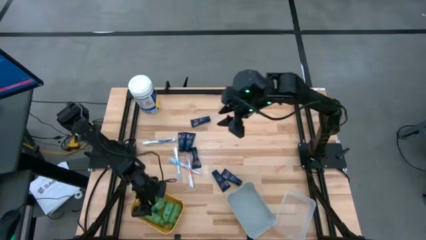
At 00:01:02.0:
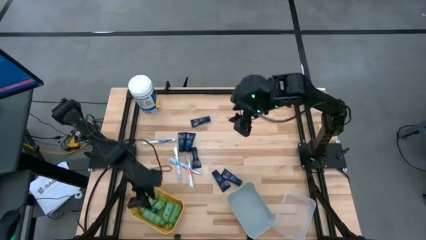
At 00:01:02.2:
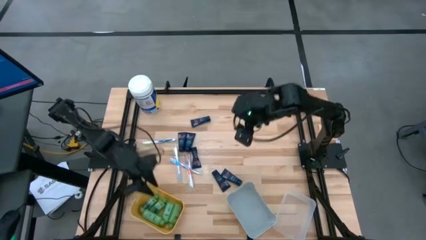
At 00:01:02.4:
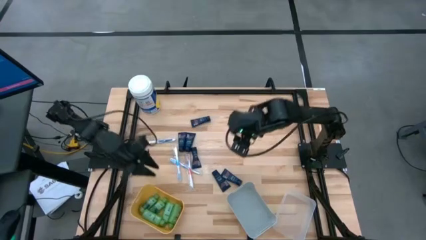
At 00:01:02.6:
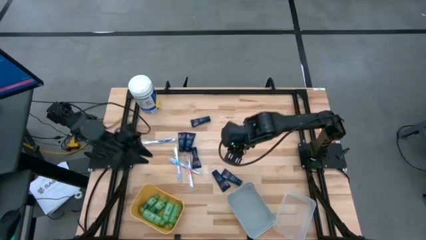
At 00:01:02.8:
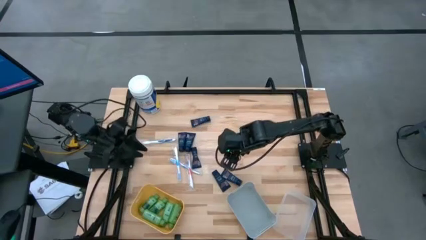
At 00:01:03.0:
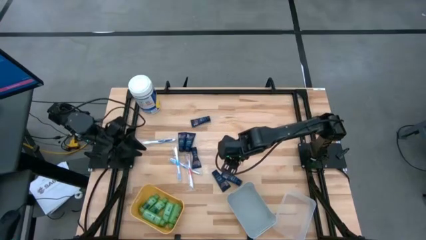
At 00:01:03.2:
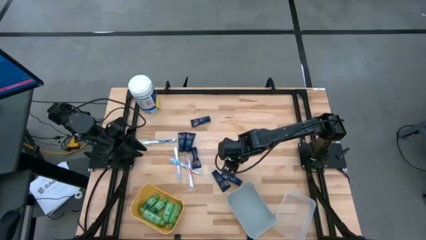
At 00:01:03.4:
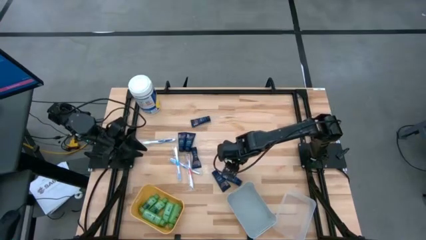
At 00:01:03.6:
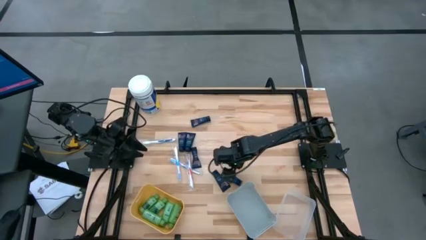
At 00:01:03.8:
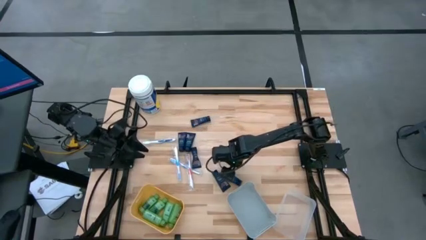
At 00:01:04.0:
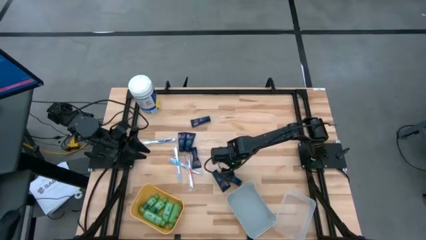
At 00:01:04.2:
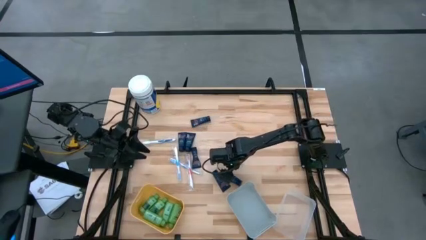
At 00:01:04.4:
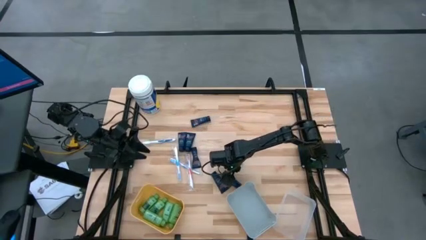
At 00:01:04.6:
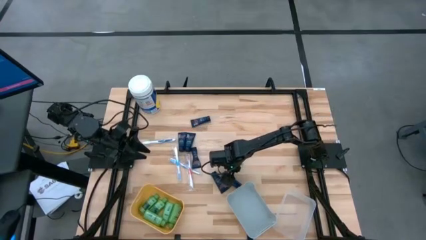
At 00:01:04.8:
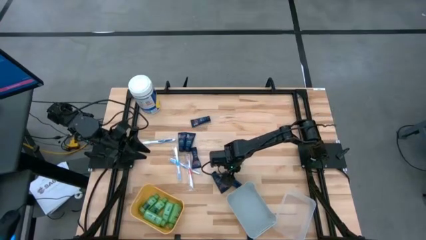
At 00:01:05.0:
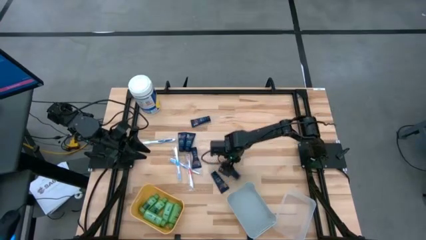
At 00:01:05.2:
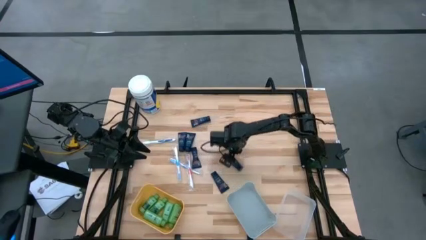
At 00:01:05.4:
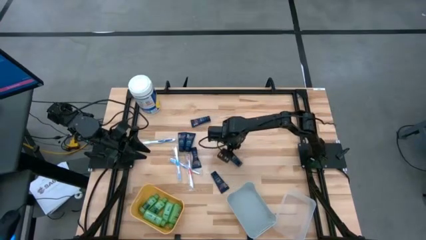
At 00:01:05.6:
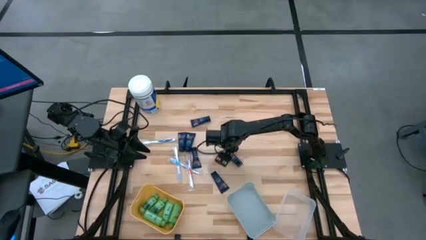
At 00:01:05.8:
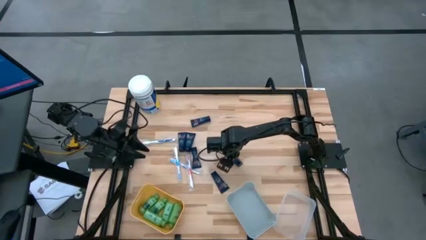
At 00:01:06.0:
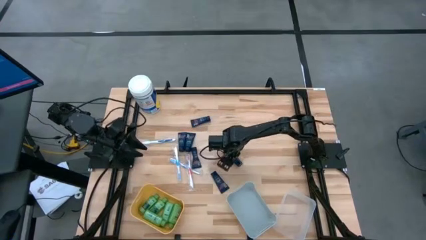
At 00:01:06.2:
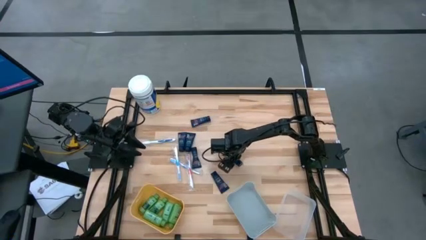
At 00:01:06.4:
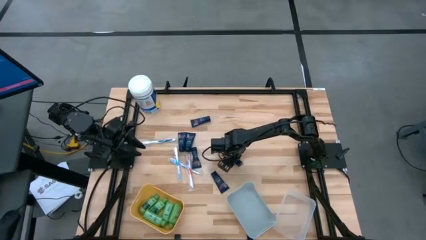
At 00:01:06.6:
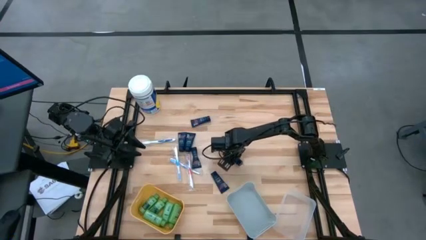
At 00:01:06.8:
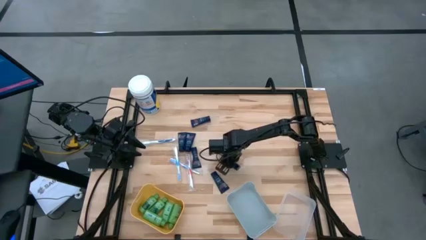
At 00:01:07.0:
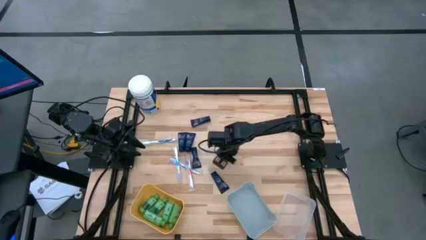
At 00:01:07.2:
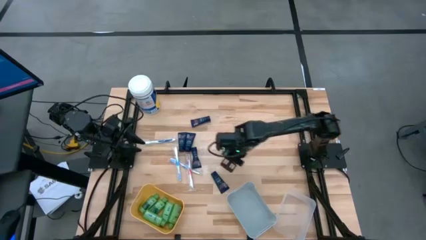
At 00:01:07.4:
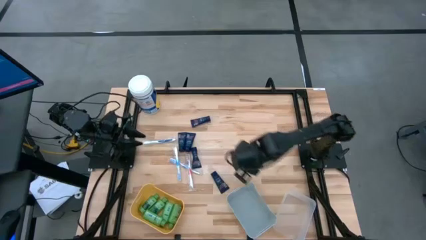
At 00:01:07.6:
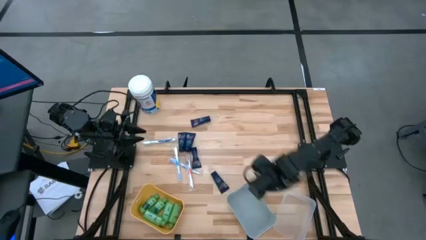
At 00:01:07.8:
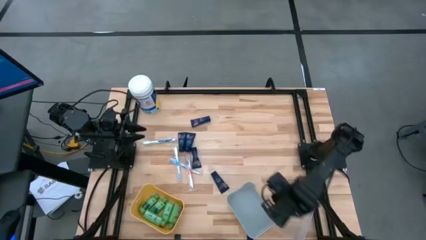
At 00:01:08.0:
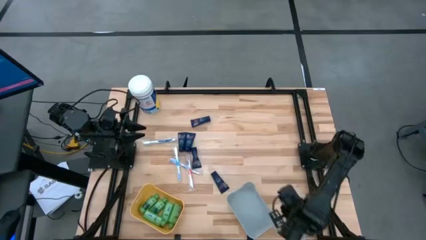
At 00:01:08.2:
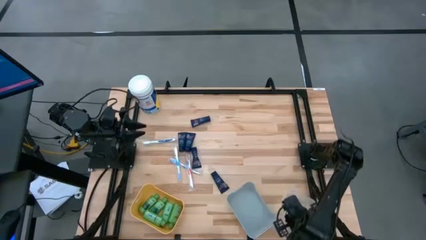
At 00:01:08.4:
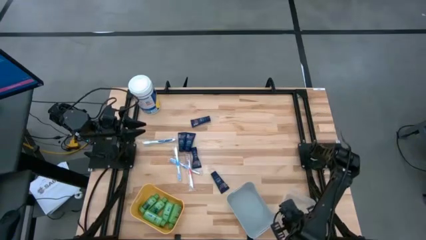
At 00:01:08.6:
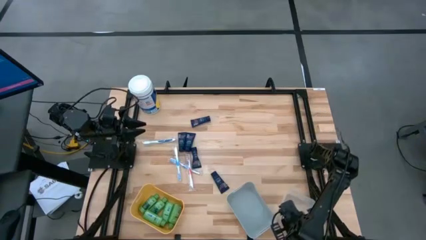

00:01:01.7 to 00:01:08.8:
Task: Pick & Place Travel size toiletries
Put the blue shave cream into the transparent bin

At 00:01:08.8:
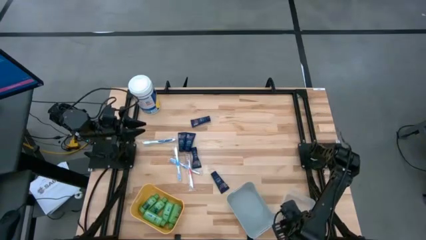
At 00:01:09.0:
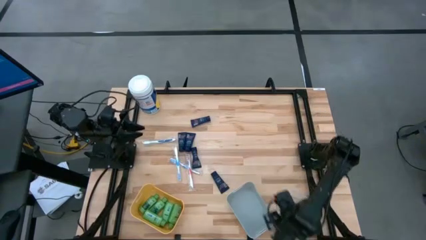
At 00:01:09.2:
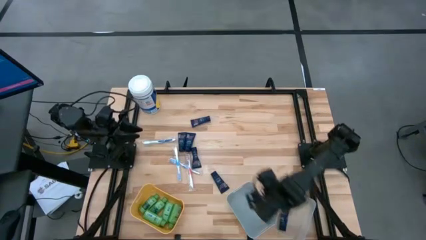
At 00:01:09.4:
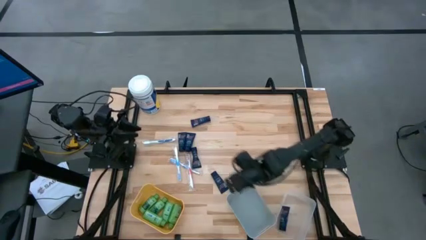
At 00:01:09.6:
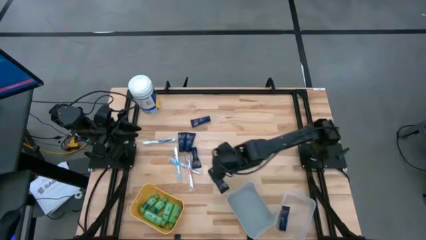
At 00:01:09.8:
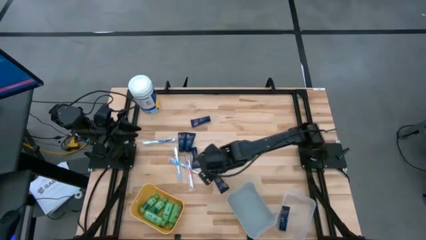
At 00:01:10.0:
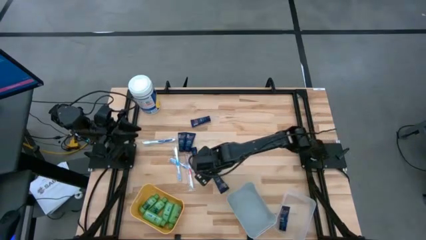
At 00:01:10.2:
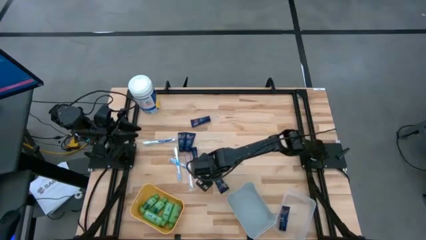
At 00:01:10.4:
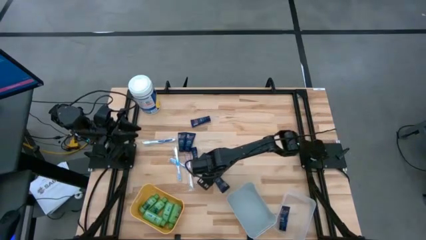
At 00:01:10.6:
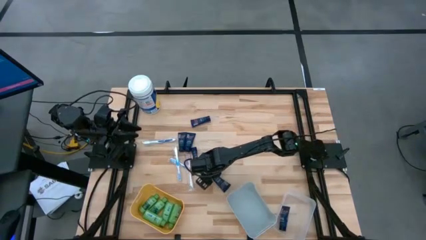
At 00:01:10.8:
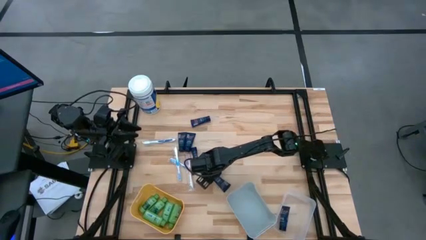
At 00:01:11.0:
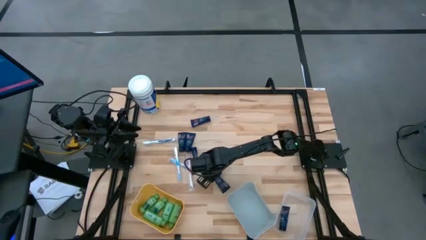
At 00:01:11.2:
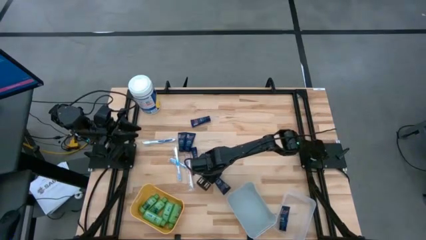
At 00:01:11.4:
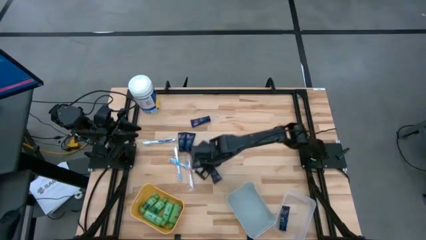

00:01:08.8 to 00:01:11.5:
Put the blue shave cream into the transparent bin

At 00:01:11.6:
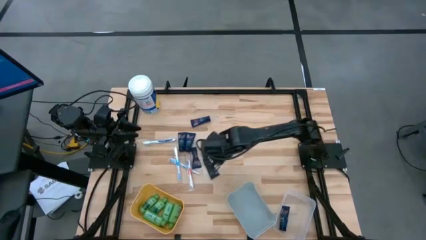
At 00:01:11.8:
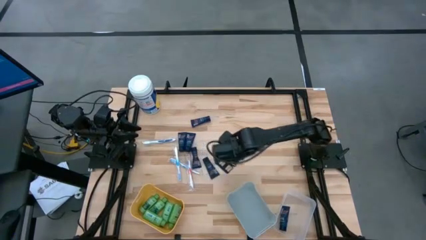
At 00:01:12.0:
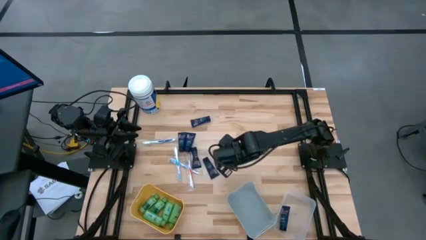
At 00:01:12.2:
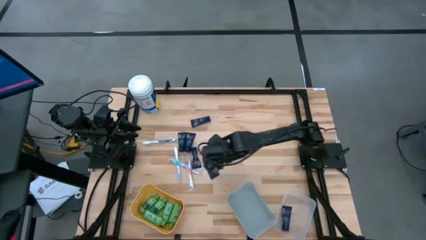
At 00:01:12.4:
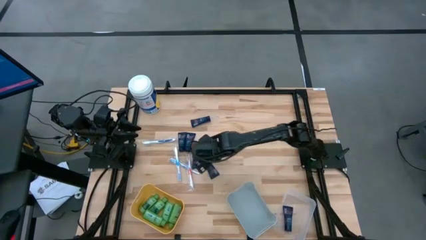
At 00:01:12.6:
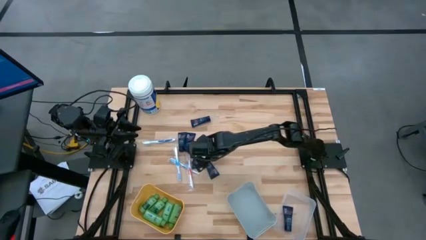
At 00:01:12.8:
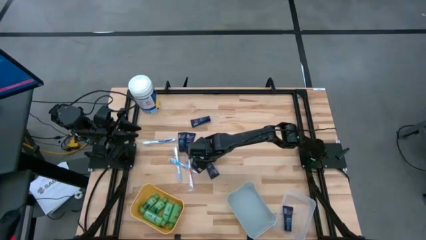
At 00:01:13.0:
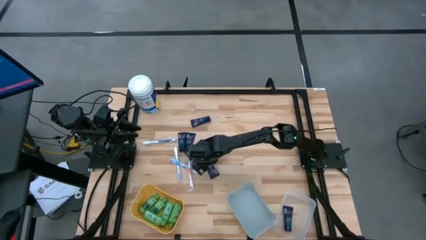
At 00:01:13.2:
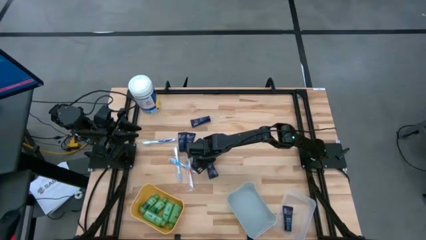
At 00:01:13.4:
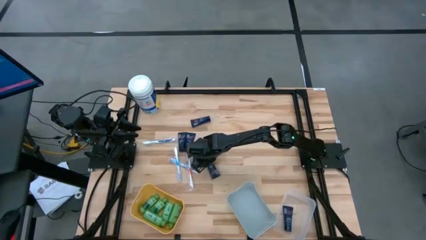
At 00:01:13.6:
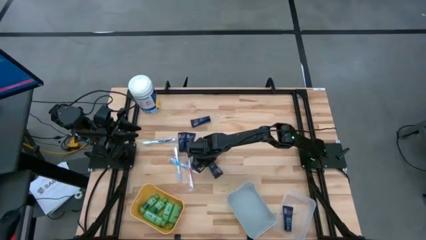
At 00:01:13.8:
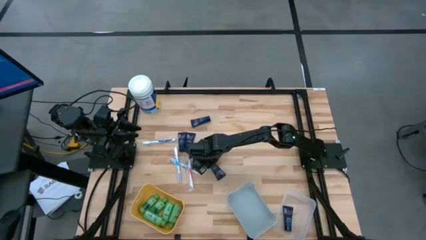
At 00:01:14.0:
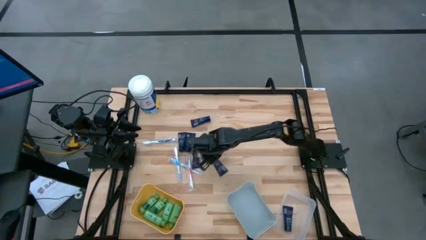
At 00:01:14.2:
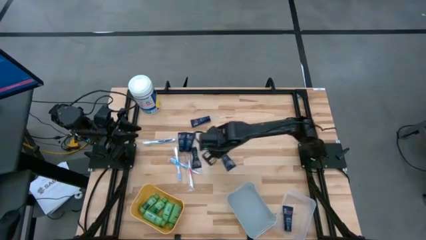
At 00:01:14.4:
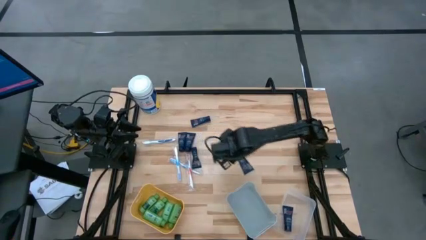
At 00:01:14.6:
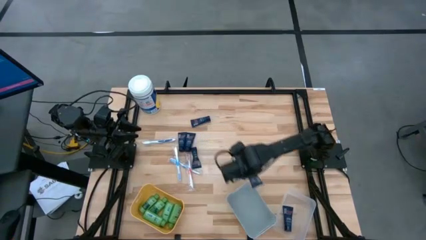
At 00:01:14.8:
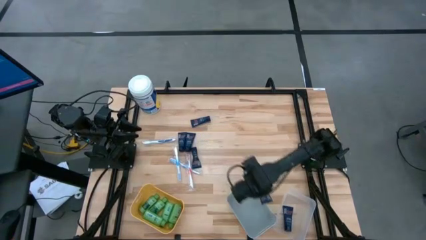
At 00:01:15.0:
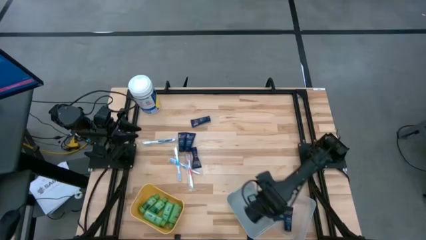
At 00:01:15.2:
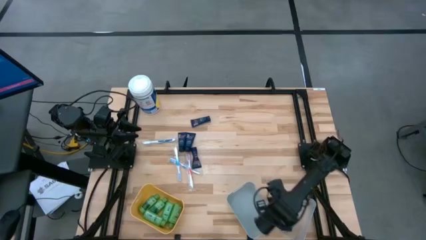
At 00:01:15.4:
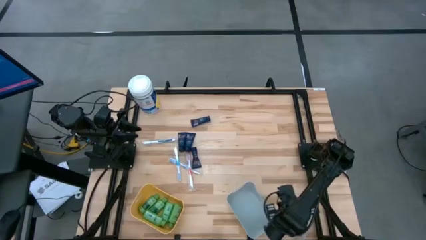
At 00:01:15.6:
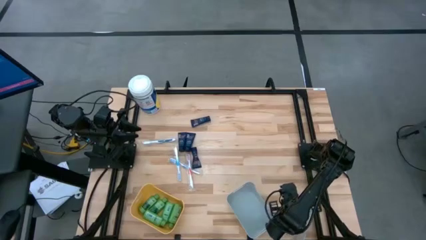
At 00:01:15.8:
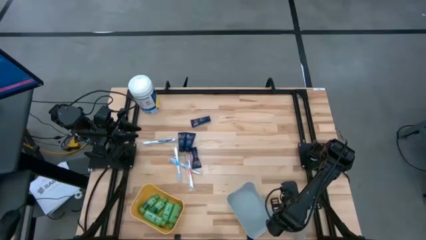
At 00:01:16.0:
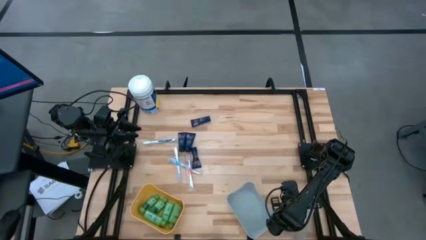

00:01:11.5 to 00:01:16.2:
Put the blue shave cream into the transparent bin

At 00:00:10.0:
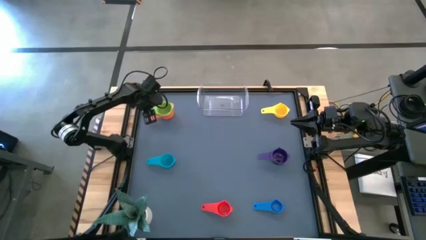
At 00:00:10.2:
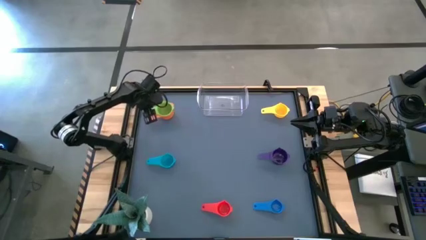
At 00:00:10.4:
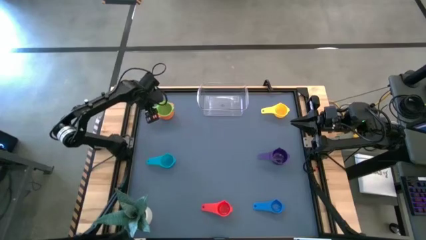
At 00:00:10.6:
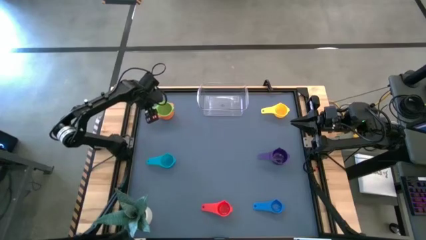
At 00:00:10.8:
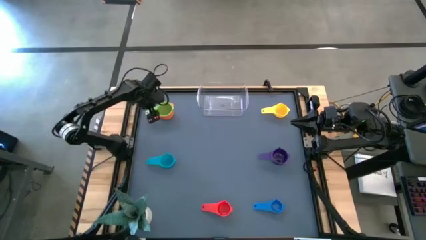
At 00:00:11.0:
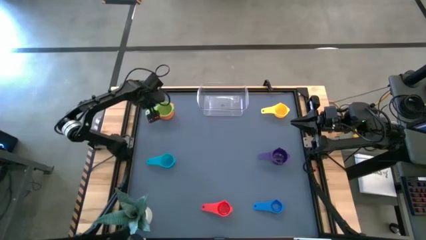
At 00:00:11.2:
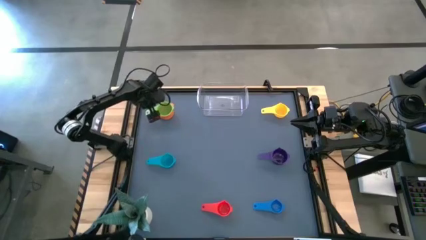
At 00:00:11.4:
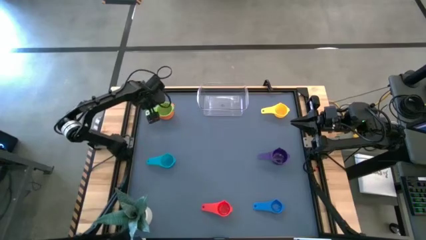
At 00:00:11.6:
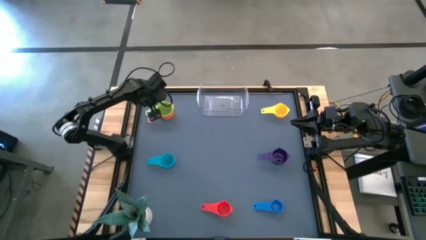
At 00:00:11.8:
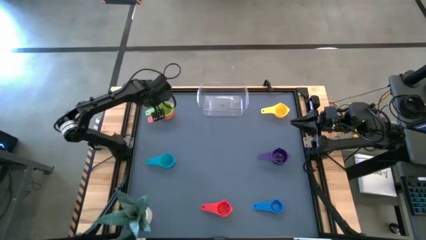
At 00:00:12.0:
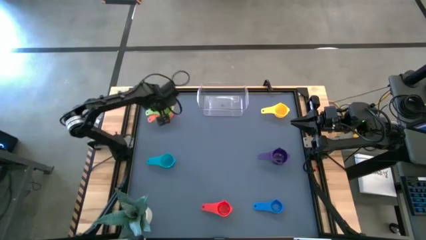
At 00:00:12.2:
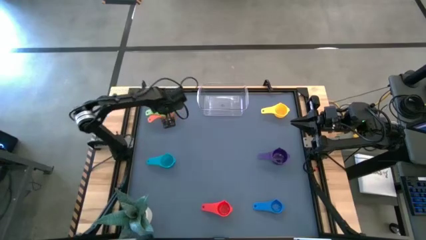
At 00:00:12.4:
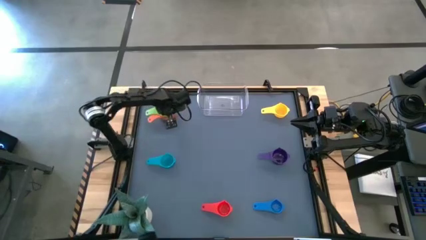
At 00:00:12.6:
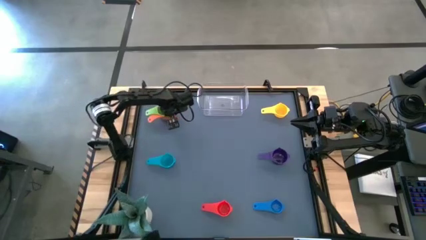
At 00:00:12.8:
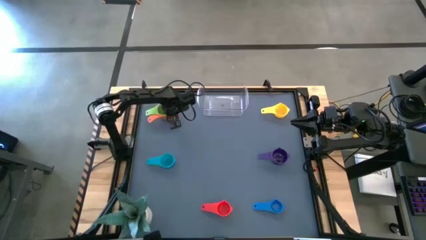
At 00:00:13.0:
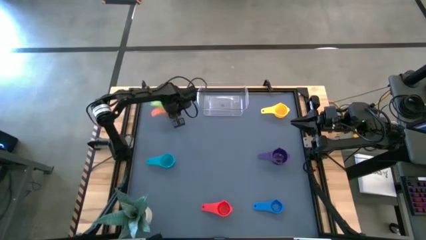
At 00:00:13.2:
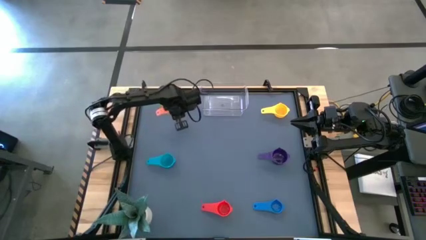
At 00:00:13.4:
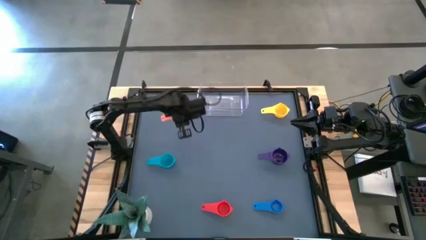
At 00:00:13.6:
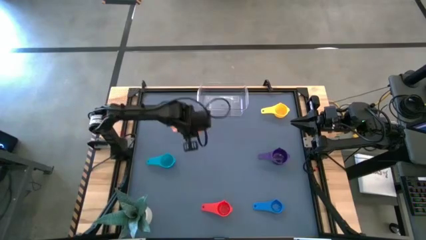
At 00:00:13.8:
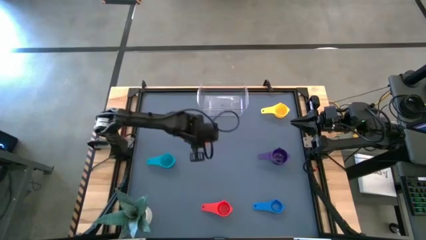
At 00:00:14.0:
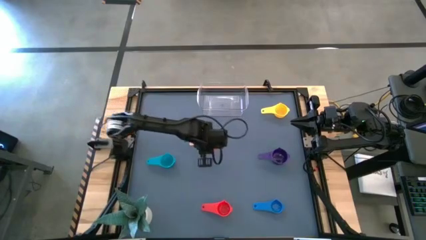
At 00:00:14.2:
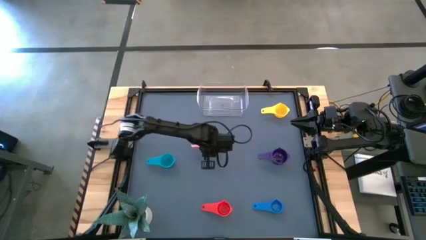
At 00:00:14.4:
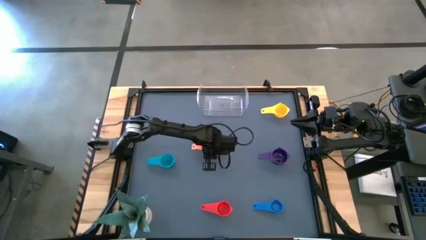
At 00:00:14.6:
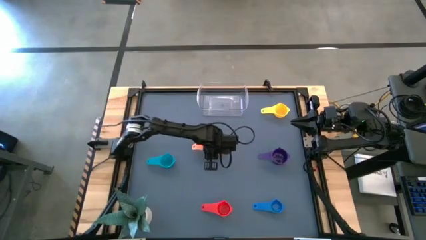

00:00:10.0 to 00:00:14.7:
Task: Nest measuring cups in basket
Move the stacked measuring cups to the center of the table
